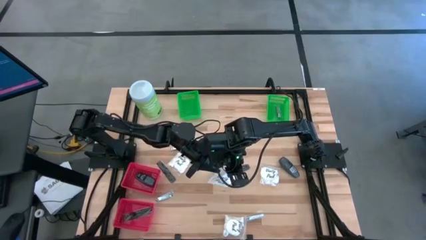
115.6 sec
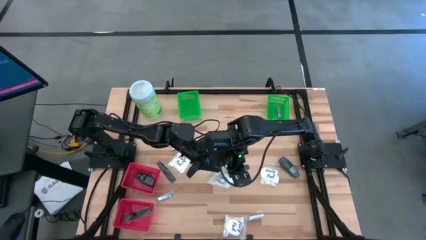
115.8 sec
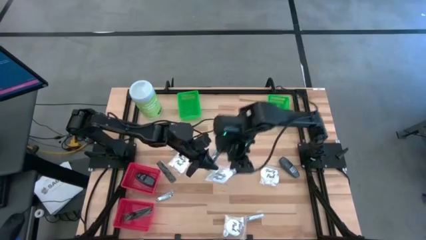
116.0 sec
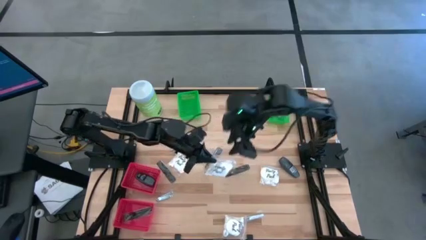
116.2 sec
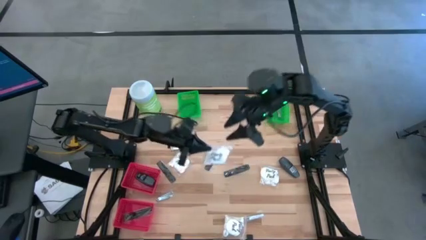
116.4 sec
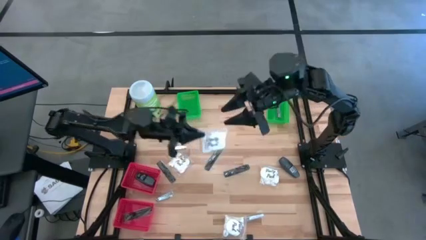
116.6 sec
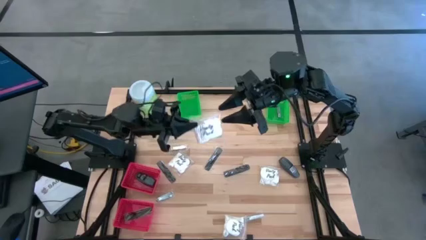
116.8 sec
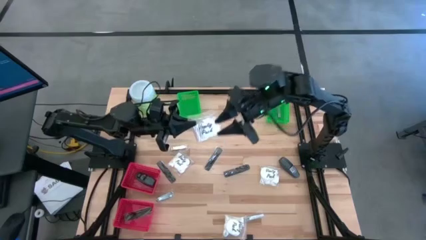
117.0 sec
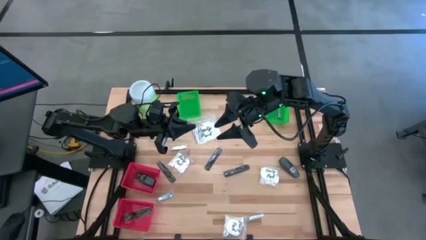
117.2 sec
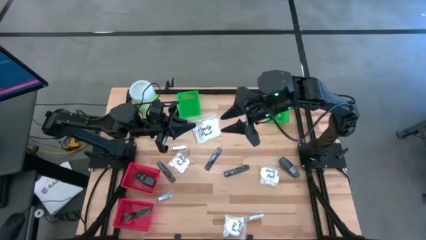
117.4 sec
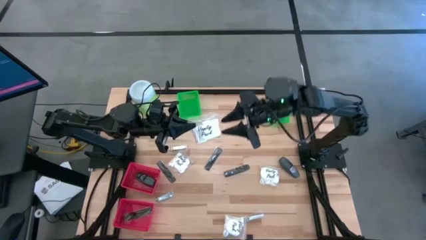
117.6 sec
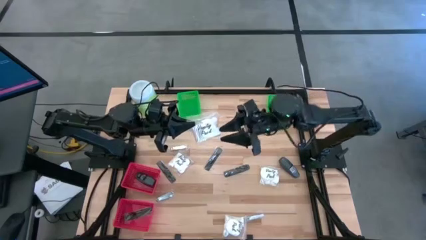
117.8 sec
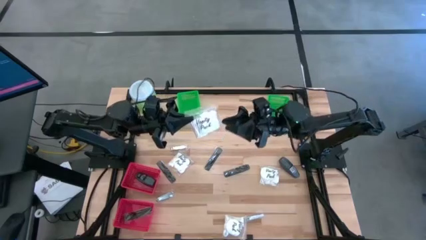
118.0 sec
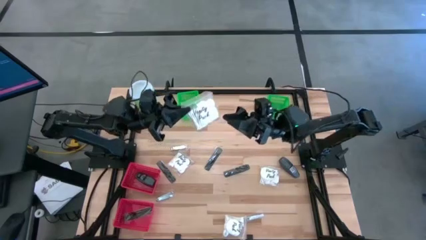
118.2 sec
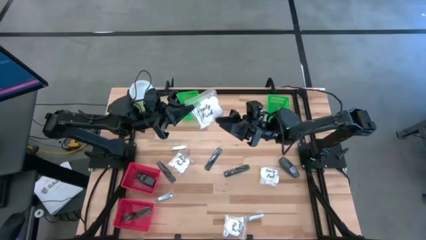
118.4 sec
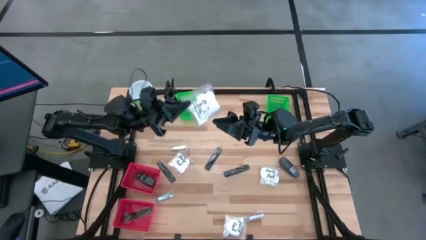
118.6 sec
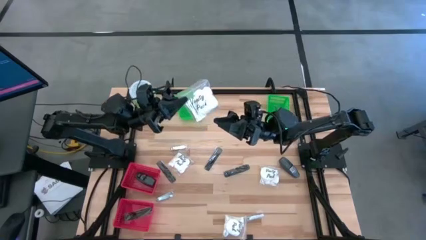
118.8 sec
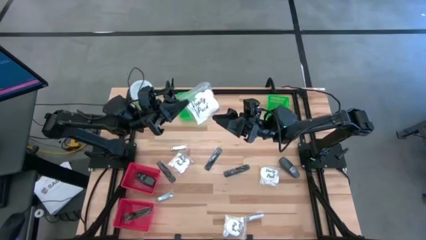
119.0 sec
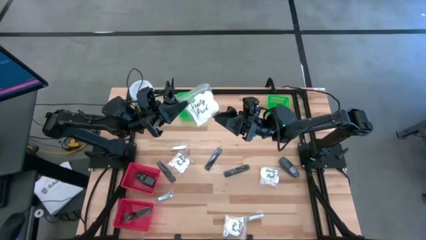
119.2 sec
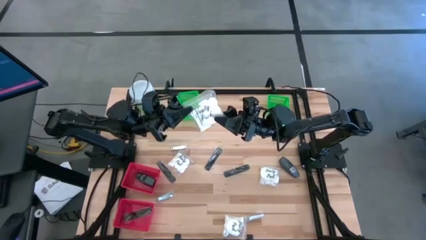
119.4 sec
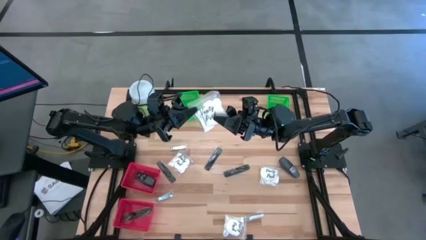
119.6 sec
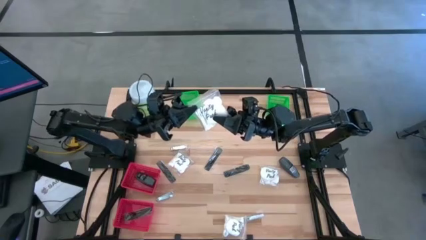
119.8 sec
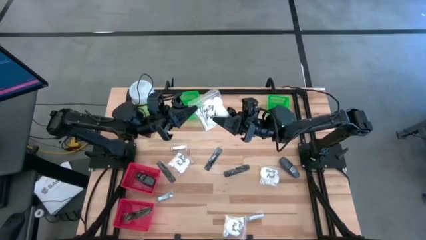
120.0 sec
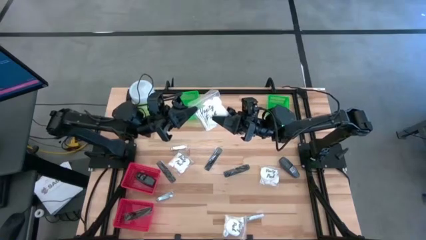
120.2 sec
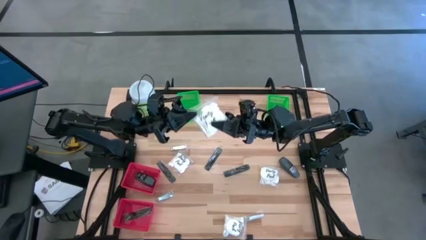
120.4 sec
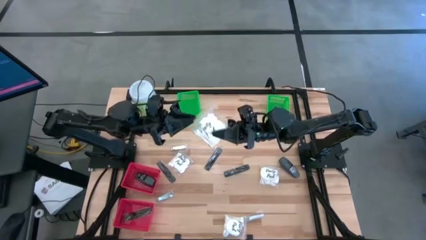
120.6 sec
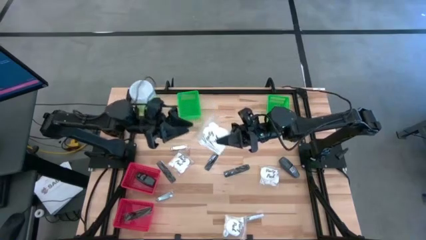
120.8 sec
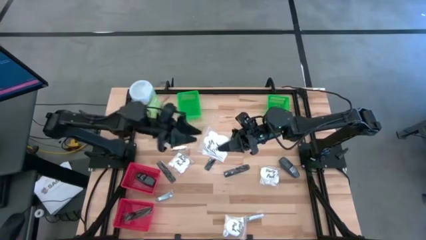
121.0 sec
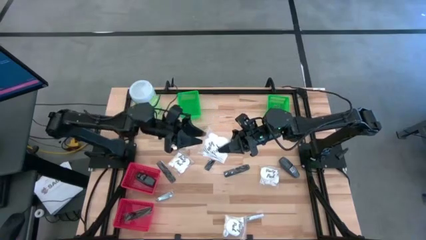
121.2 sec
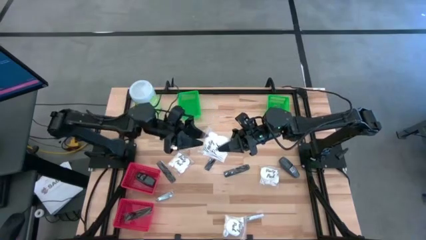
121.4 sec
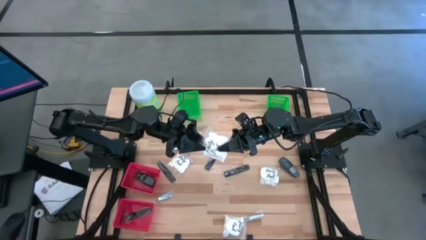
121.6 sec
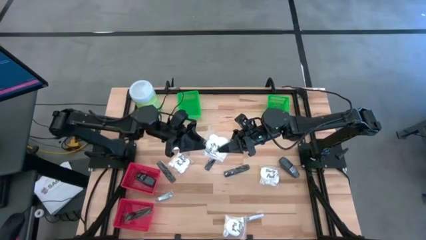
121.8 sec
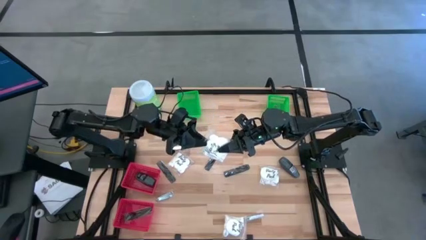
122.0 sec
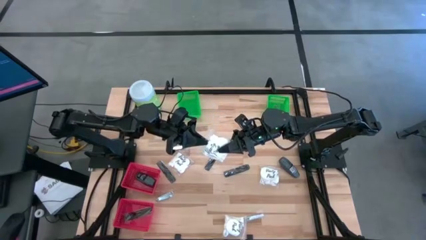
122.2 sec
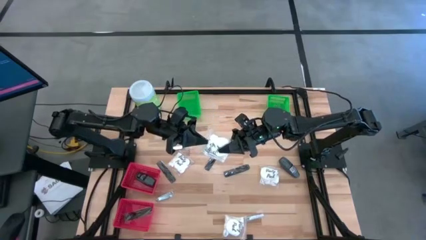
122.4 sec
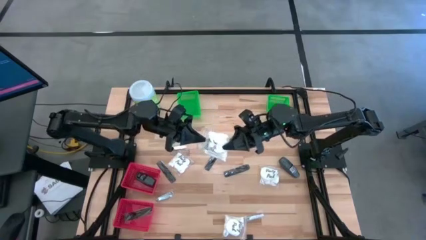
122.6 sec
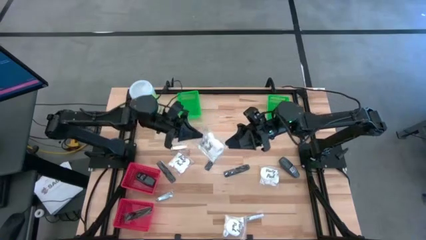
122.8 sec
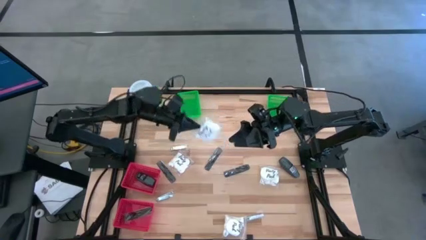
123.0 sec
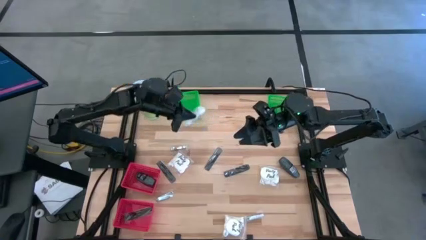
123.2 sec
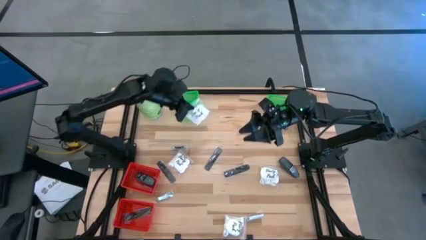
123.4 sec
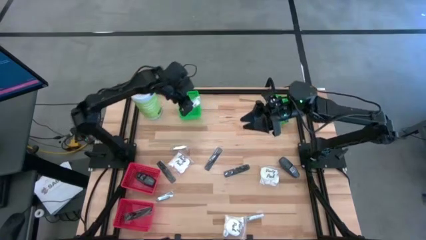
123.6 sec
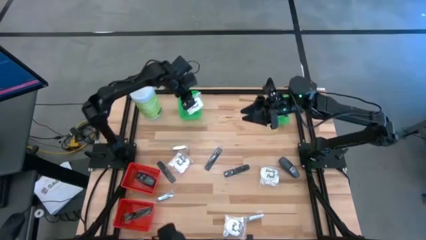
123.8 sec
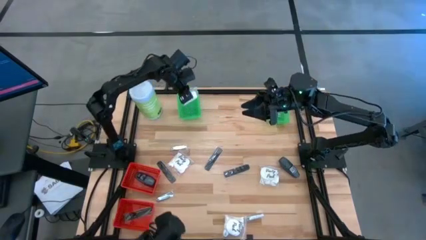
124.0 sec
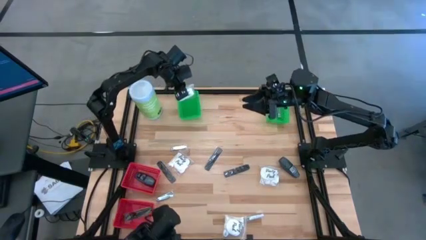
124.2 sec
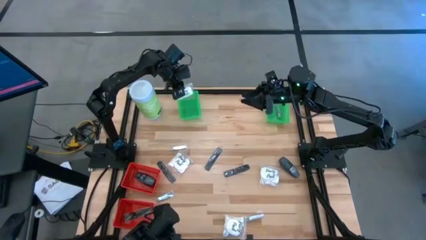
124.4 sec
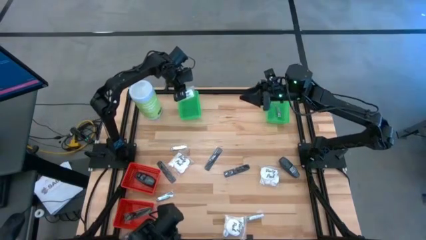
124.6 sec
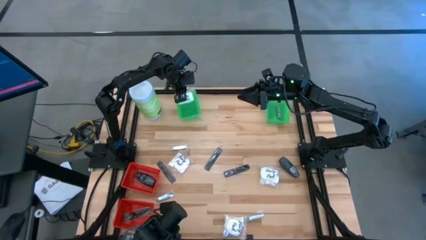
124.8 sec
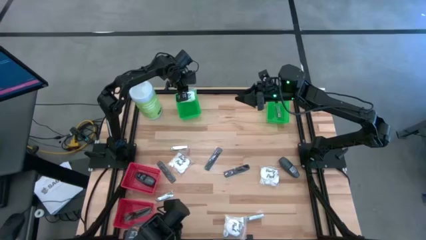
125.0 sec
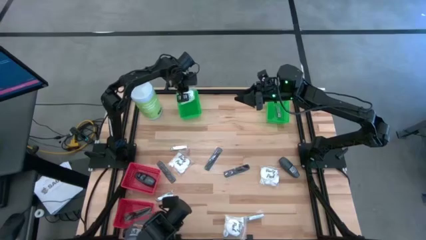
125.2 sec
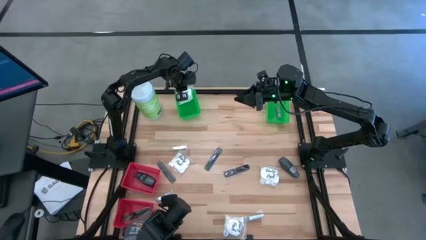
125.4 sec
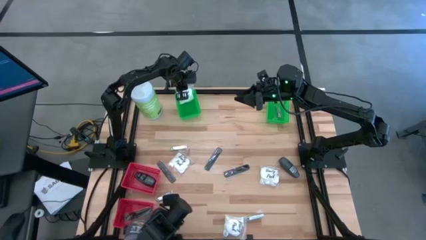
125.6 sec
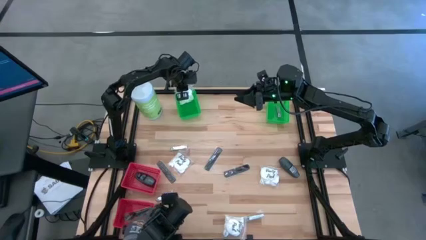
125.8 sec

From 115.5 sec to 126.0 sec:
Task: Pick & Place Travel size toiletries
Put the white vanity pack into the top left green basket

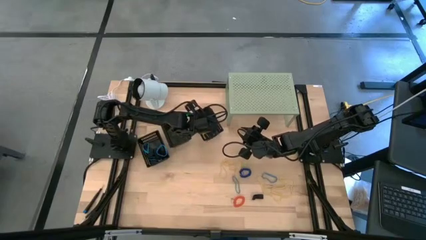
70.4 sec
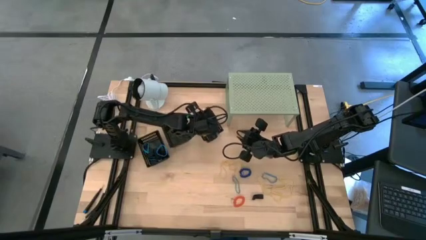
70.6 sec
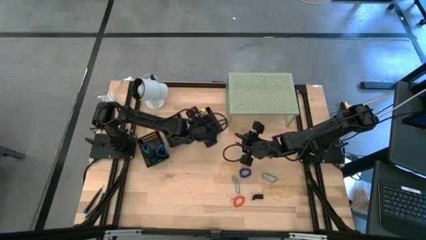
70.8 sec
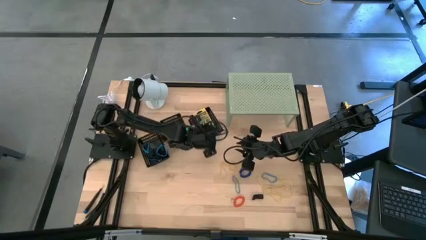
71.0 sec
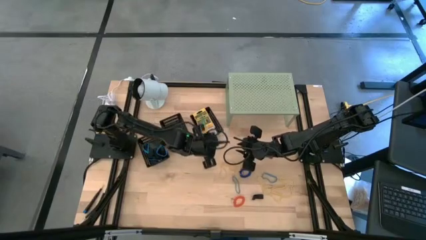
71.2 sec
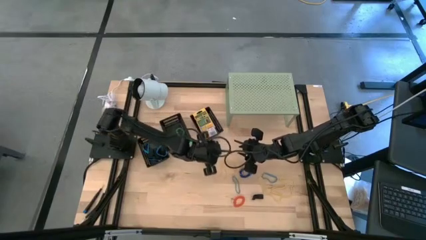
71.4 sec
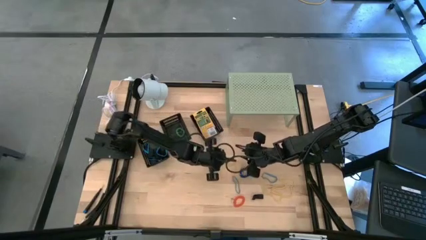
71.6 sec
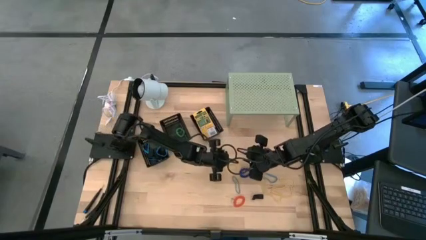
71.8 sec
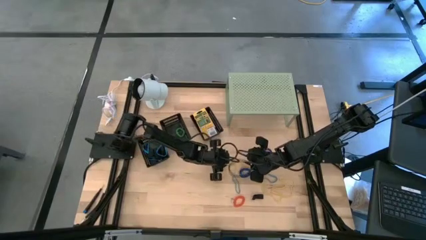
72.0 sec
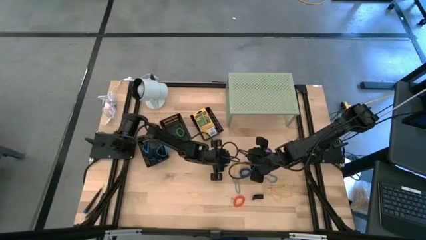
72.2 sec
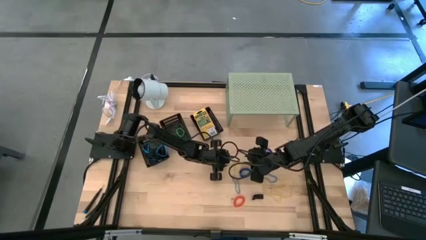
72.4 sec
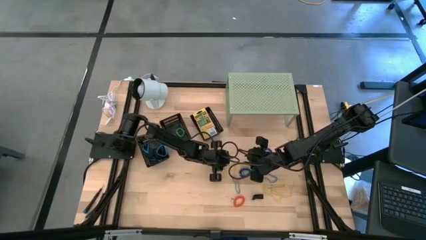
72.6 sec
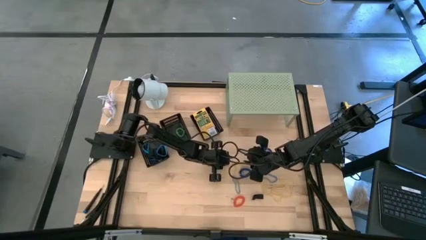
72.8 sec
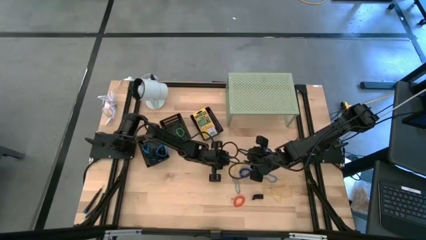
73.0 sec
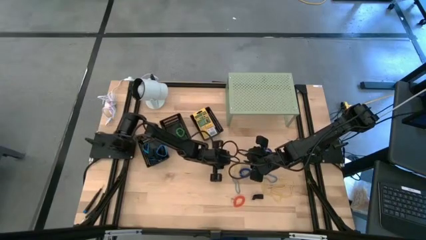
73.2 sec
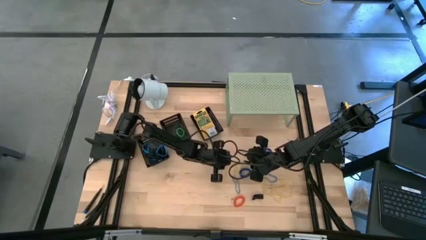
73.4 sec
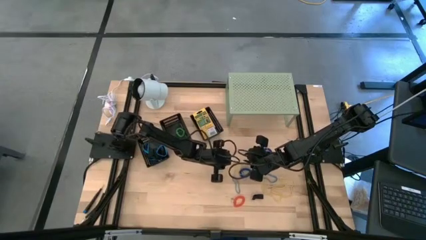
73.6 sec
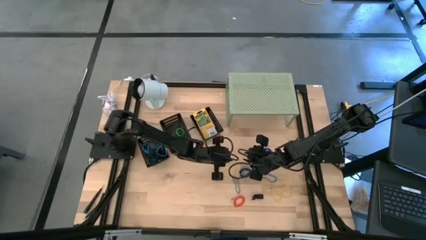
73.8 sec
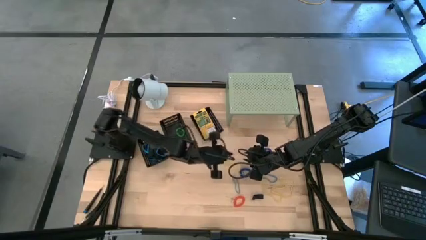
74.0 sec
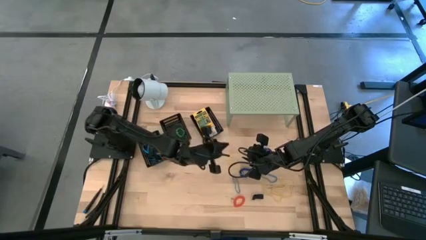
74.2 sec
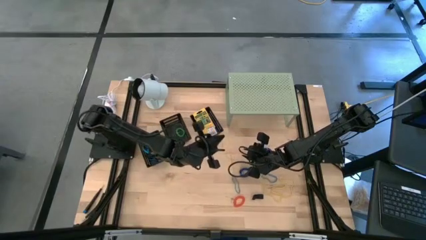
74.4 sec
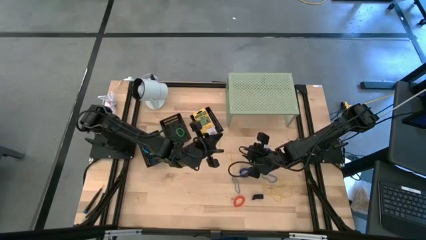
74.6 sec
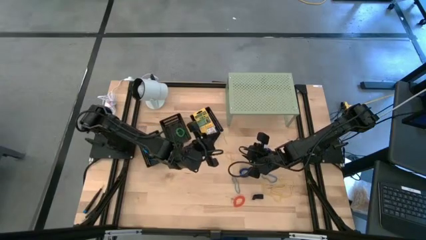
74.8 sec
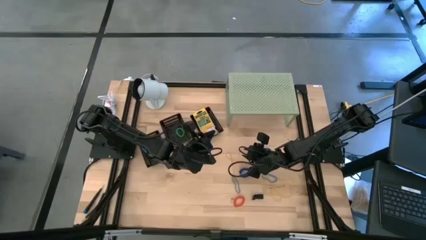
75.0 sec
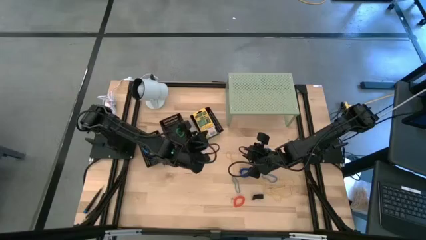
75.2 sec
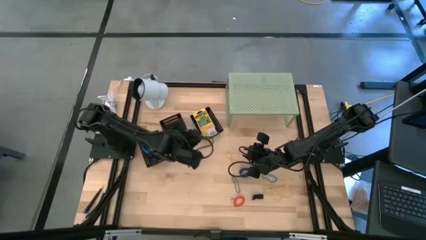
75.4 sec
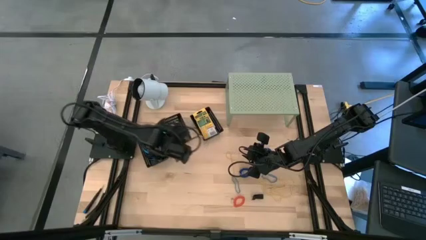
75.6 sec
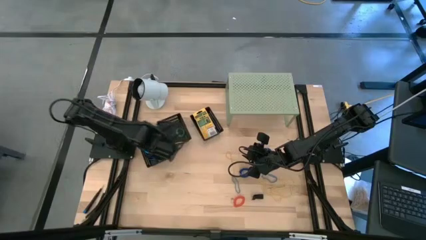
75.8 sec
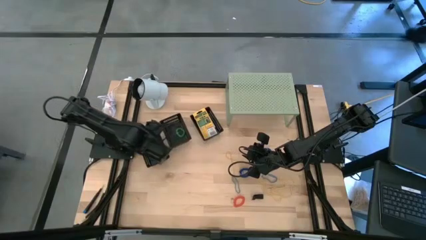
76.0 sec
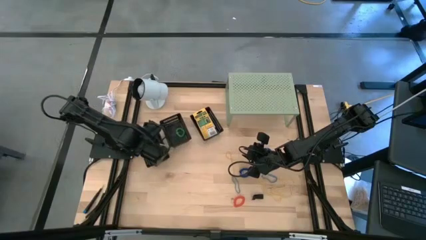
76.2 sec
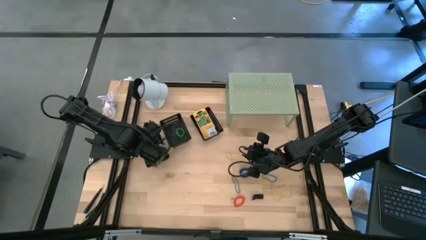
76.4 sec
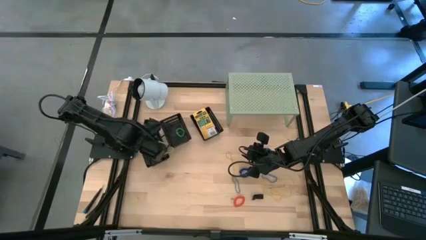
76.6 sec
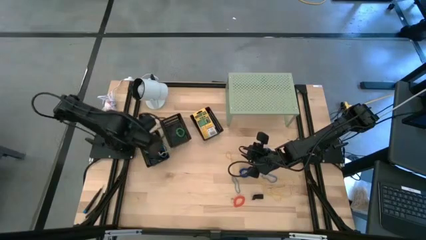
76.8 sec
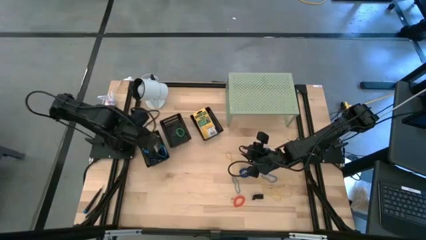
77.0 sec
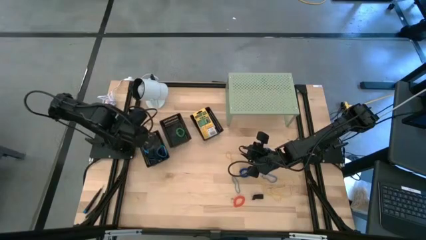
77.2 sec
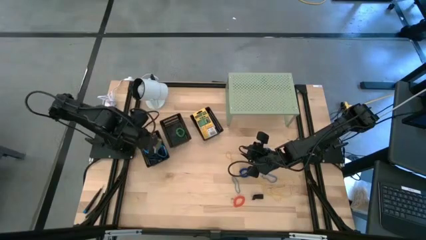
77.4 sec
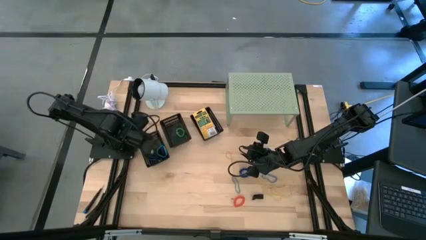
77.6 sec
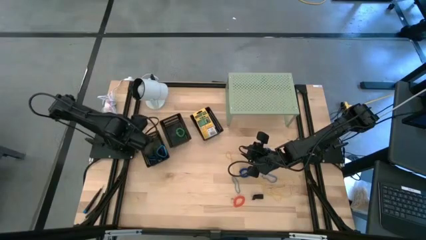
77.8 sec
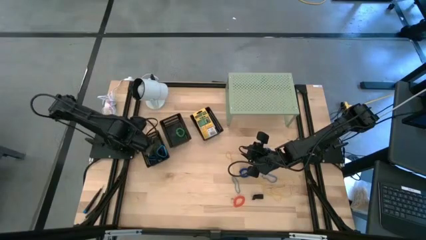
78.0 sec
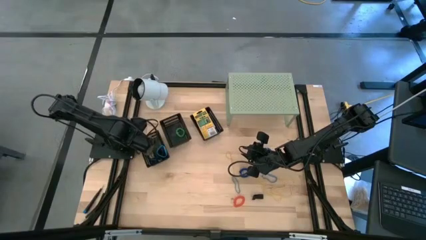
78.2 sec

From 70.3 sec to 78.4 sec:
Task: Pick & Place Office Desk Supplies
Put the yellow rubber band into the left black basket
